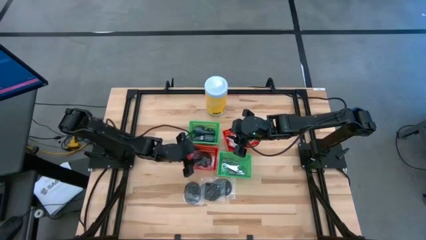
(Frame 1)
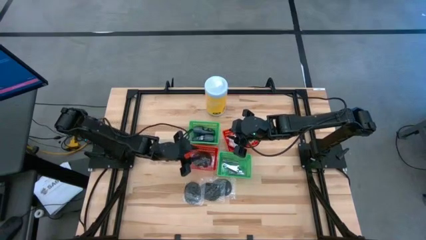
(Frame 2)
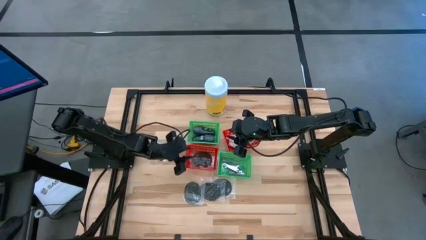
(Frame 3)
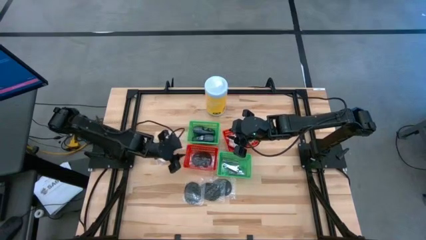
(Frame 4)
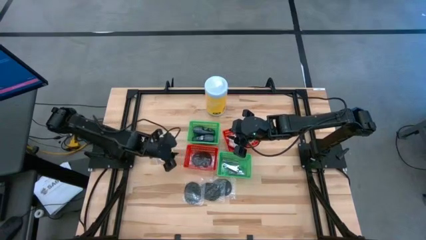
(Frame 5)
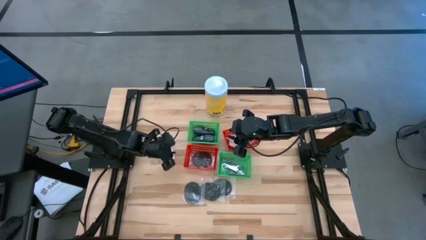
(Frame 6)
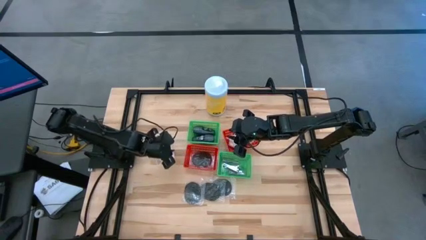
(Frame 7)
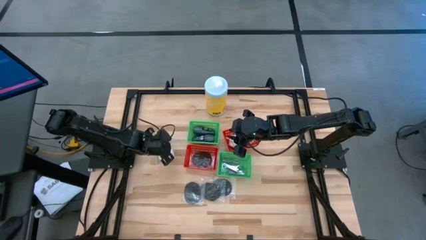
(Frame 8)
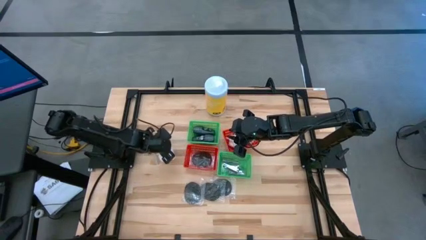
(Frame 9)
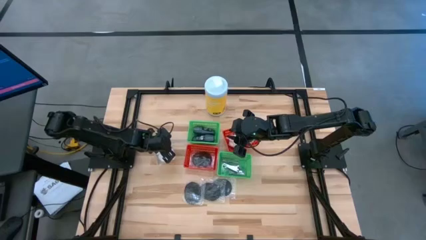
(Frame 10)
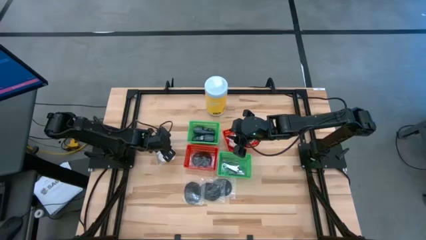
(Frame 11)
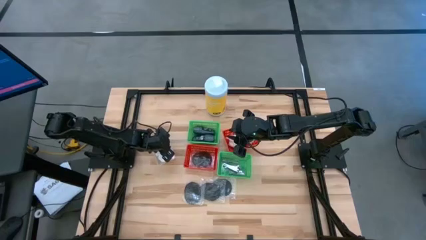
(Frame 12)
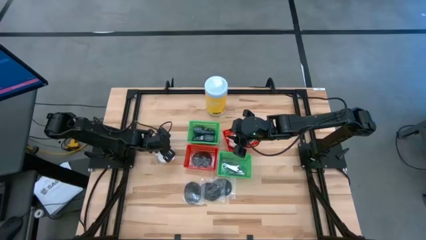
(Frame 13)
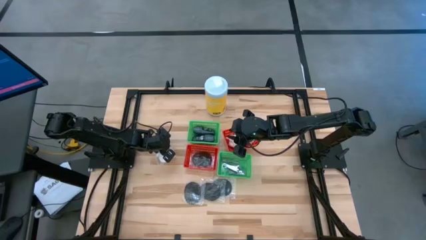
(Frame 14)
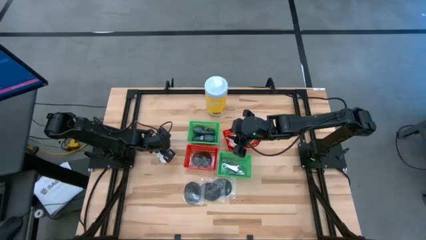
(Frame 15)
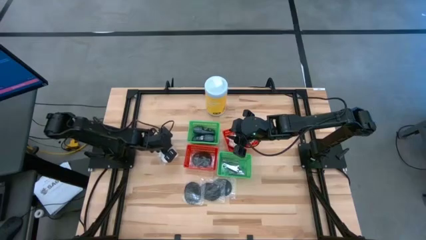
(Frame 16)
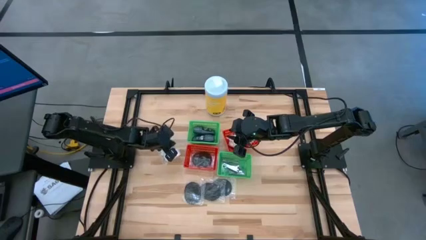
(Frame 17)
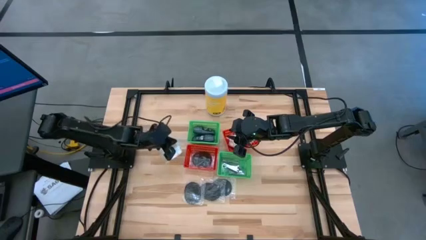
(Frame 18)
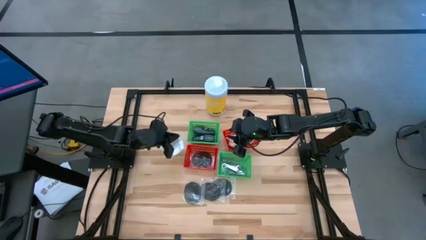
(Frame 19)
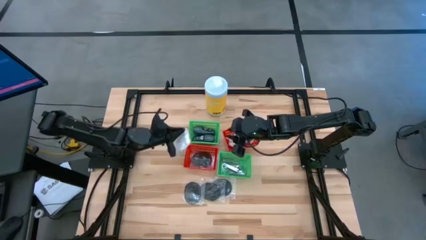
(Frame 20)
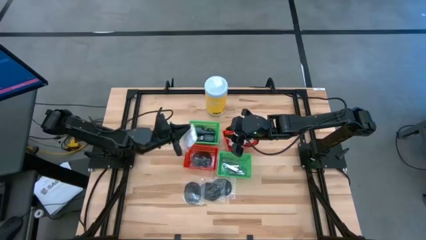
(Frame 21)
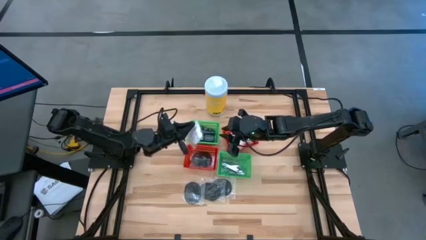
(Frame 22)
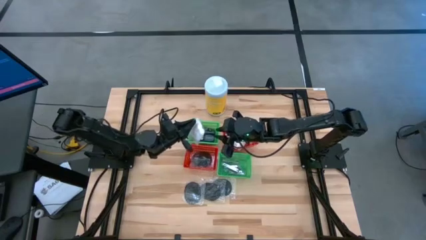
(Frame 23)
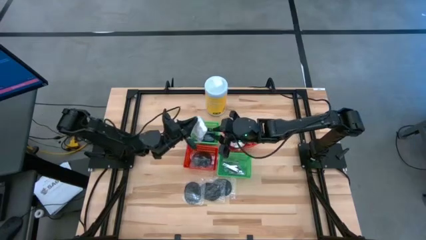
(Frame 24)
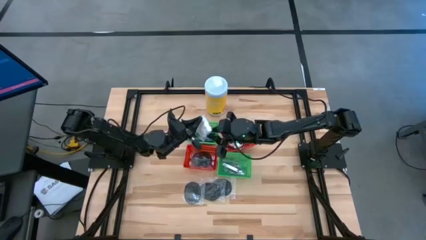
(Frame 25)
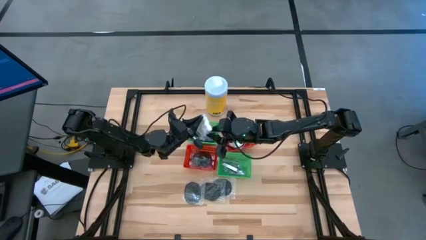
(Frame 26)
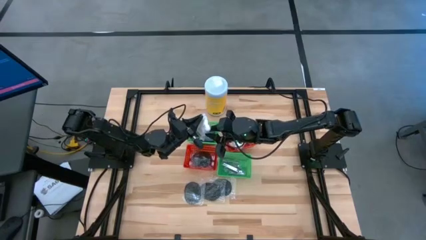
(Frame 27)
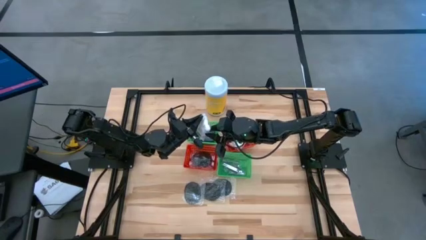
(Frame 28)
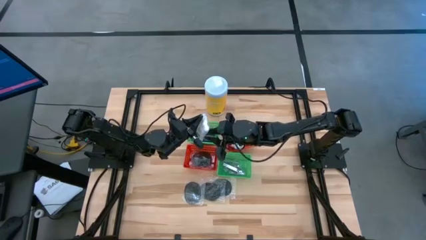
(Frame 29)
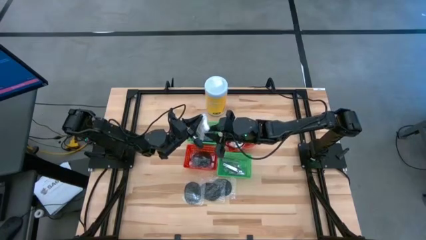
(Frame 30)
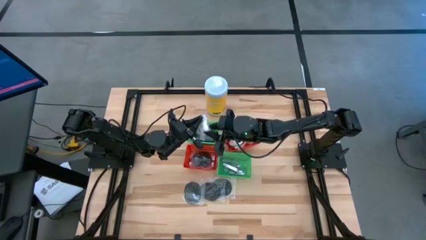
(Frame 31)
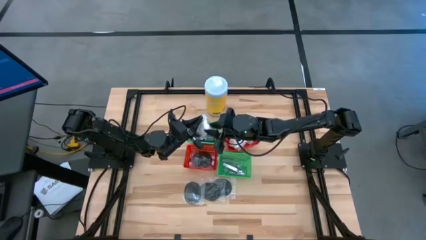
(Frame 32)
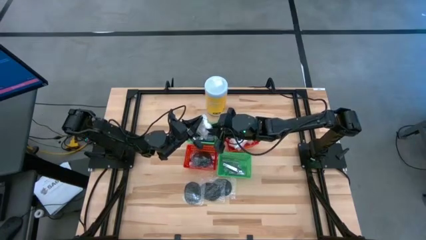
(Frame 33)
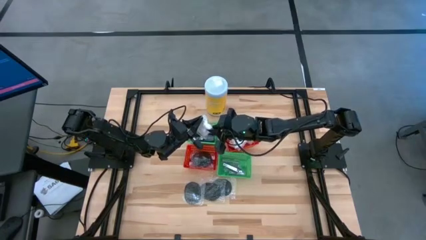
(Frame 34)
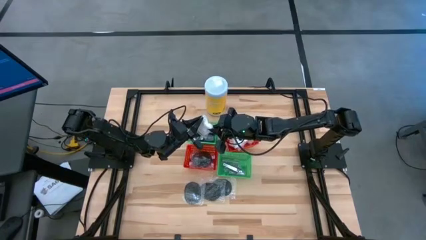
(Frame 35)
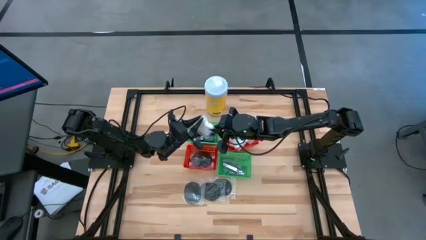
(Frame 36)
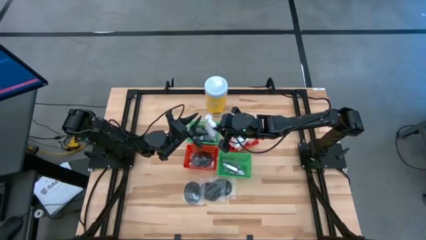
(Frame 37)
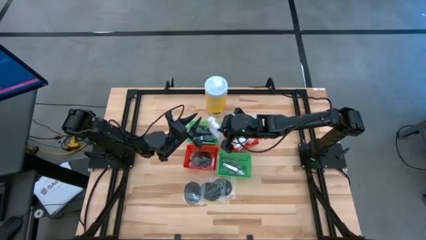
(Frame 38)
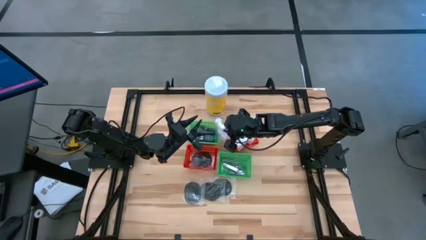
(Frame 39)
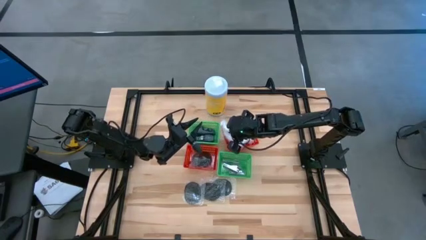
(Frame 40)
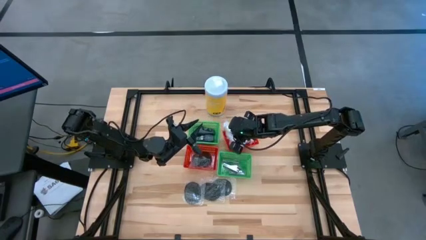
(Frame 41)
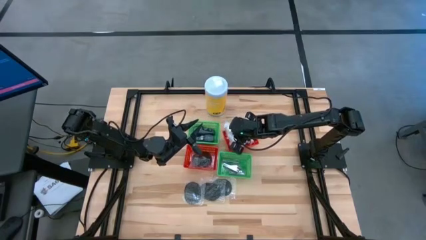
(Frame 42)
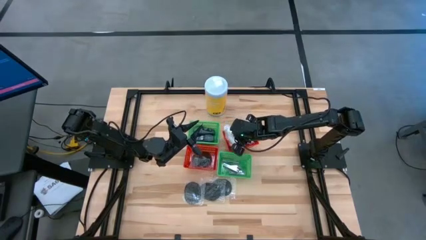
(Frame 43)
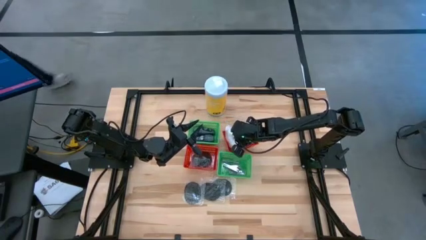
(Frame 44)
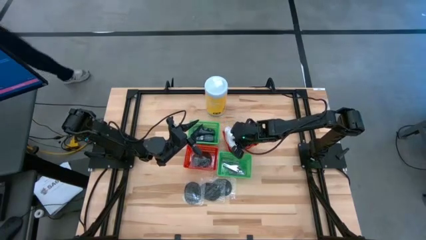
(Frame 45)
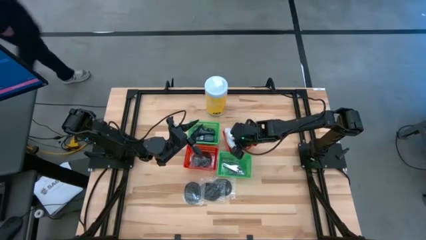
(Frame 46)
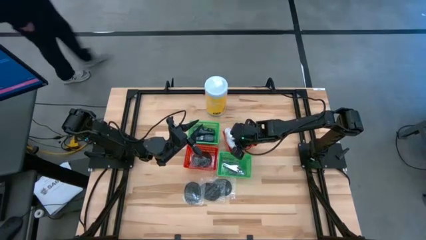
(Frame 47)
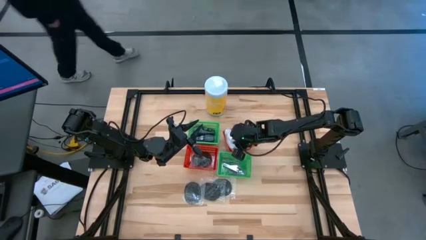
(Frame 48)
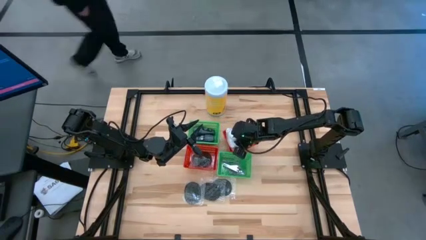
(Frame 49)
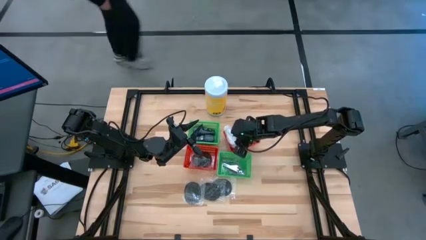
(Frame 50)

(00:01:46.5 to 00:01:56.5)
Task: Pick & Place Travel size toiletries
Put the cotton pack into the right red bin

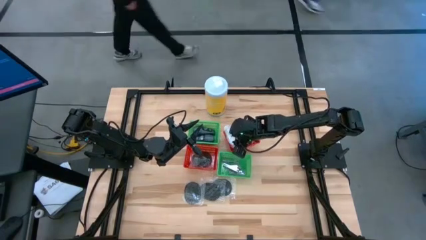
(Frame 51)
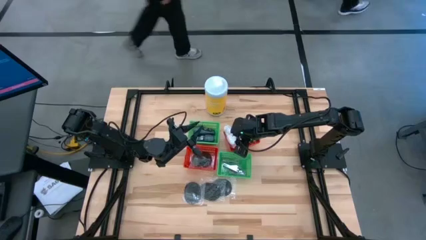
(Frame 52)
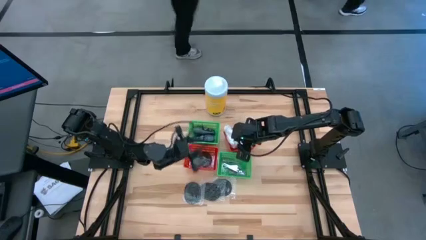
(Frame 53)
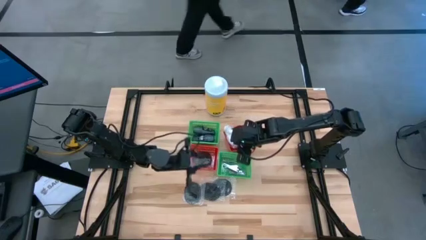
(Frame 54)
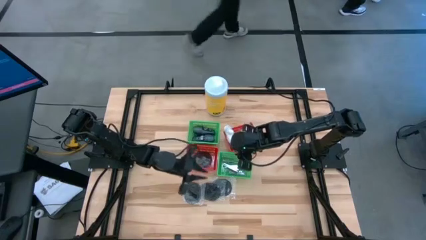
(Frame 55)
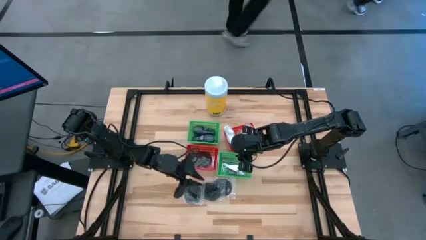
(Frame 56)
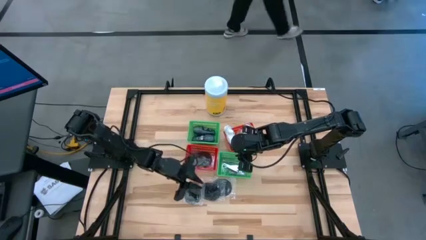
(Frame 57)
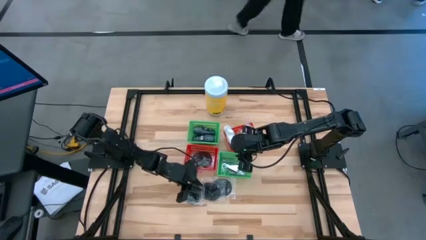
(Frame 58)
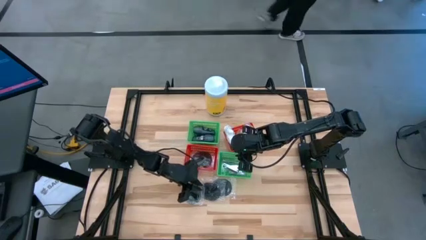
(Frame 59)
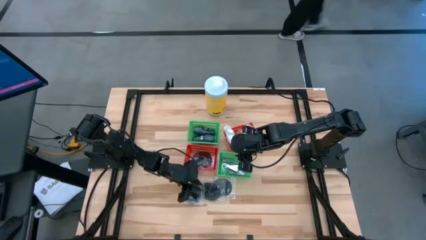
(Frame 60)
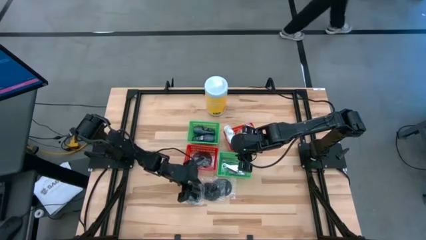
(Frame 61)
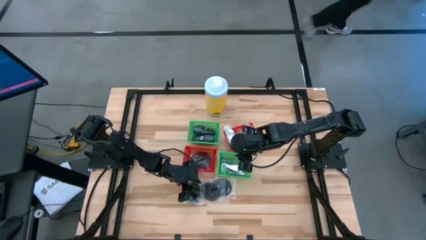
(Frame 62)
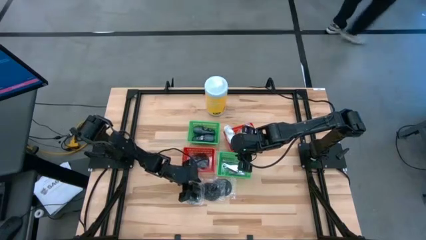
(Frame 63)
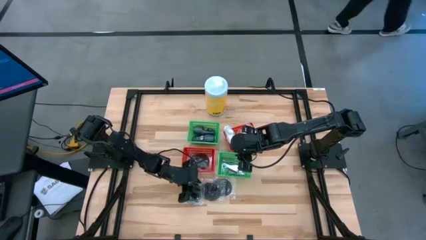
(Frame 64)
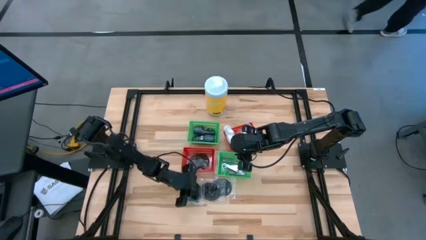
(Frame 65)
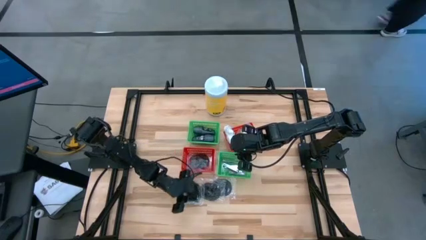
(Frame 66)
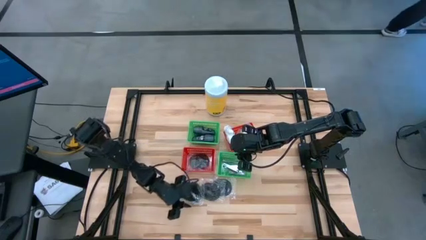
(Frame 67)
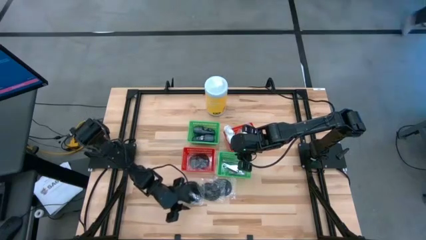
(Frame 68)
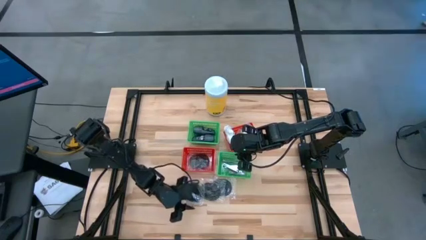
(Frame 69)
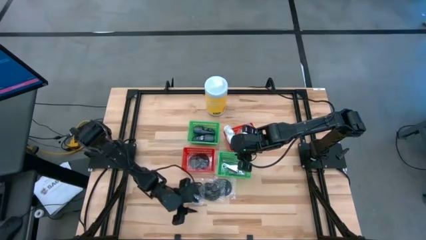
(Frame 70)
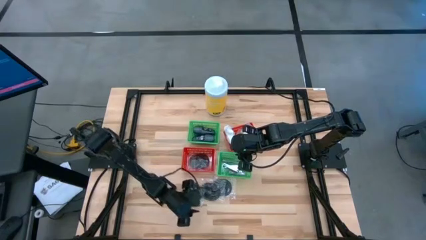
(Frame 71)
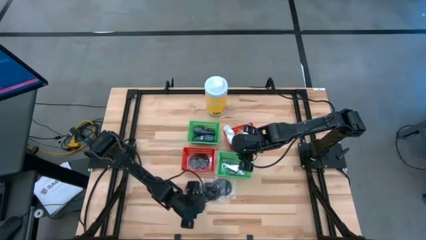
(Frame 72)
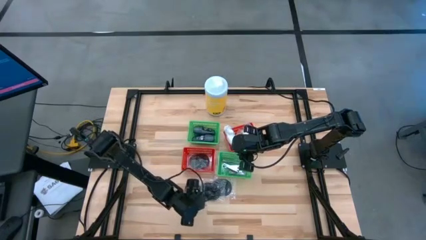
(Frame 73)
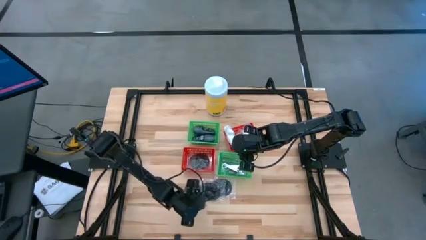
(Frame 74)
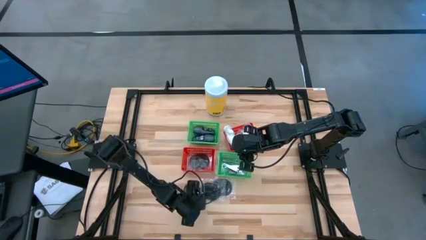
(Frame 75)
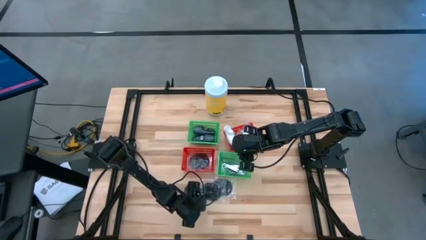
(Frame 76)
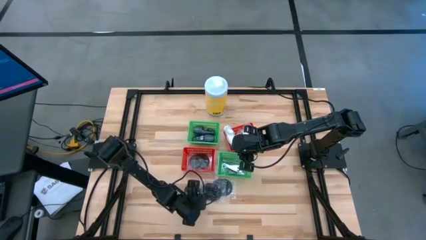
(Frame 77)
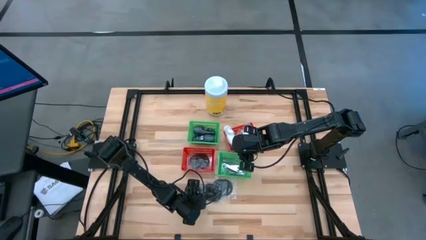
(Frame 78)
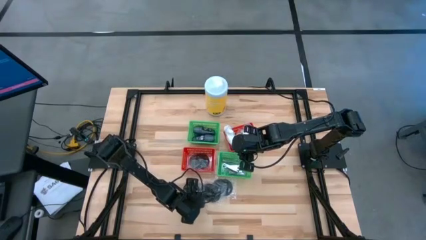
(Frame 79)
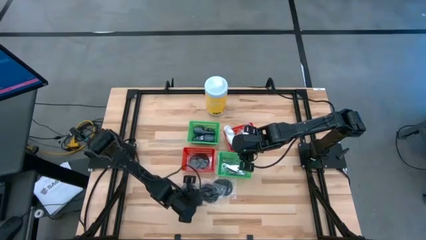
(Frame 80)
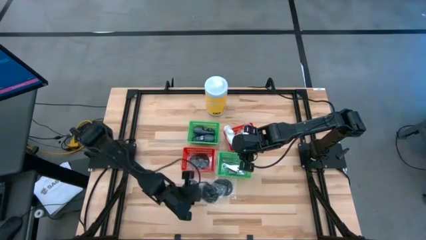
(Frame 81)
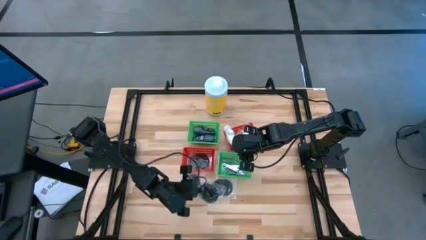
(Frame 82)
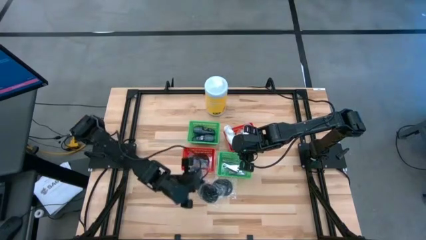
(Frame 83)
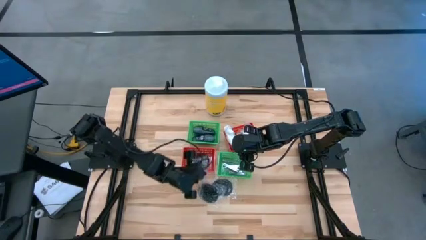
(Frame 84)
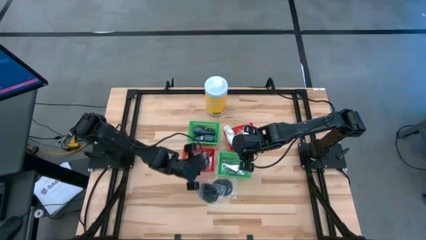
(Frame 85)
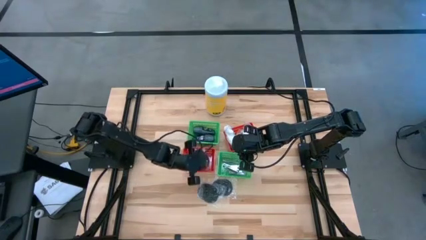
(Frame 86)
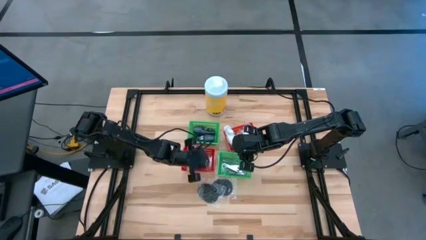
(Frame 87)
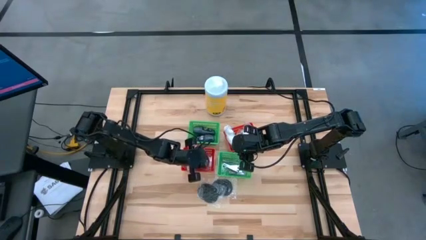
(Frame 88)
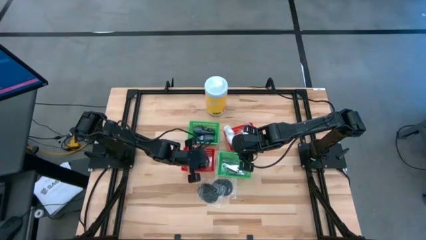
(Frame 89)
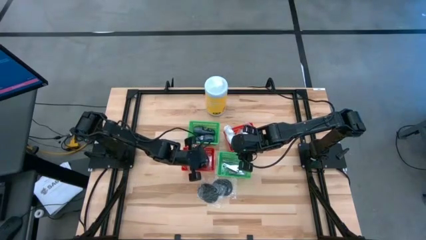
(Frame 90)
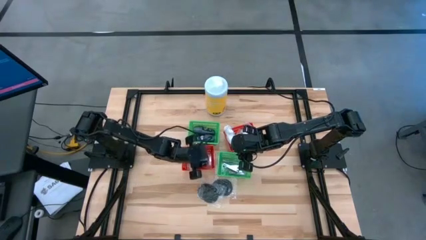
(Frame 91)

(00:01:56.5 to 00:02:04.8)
Put the hairbrush into the left red bin
